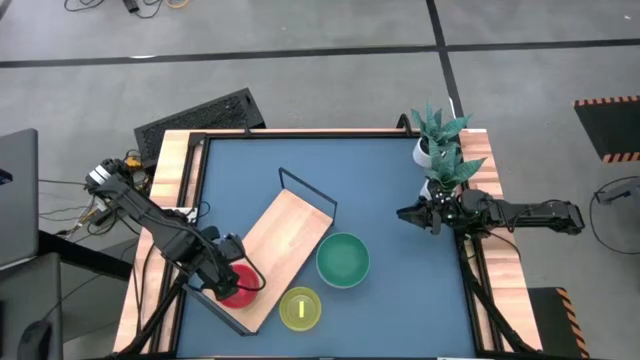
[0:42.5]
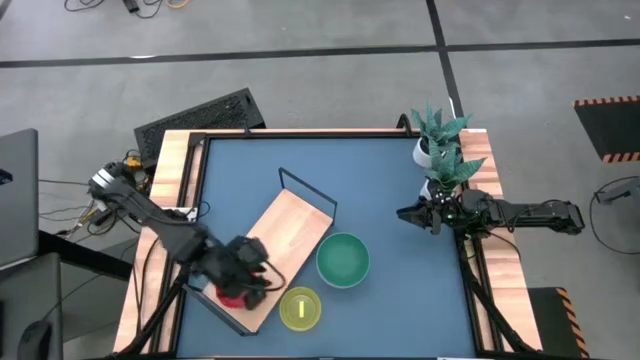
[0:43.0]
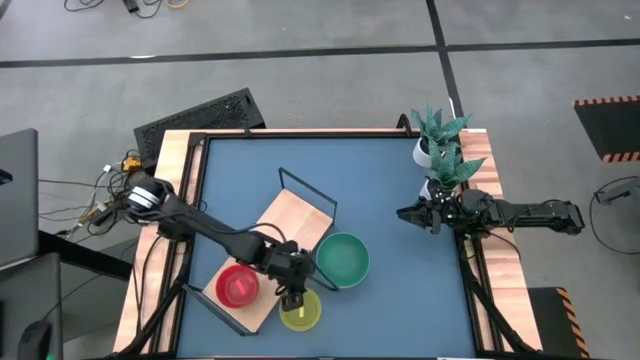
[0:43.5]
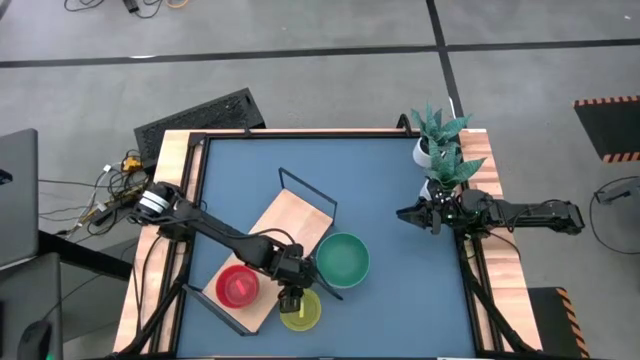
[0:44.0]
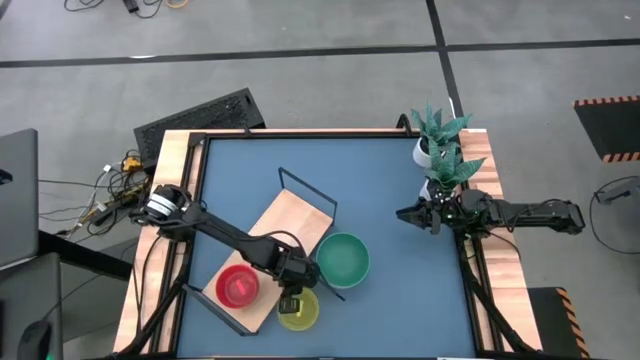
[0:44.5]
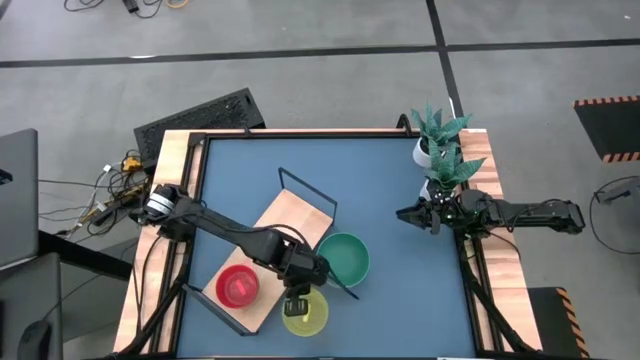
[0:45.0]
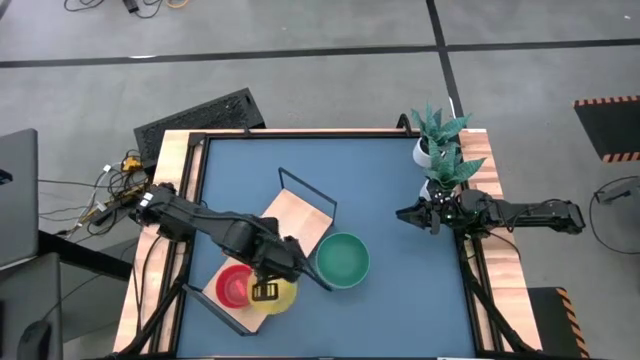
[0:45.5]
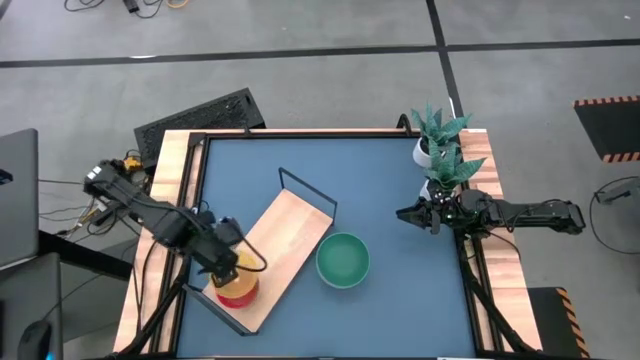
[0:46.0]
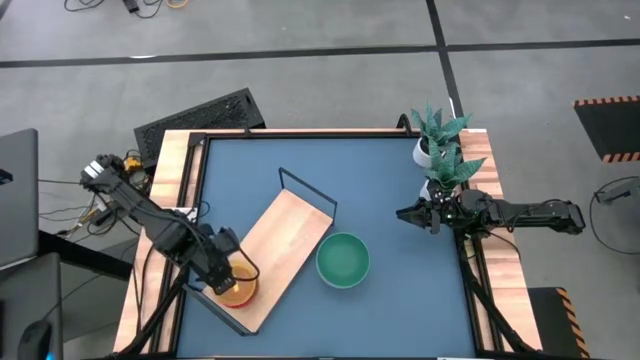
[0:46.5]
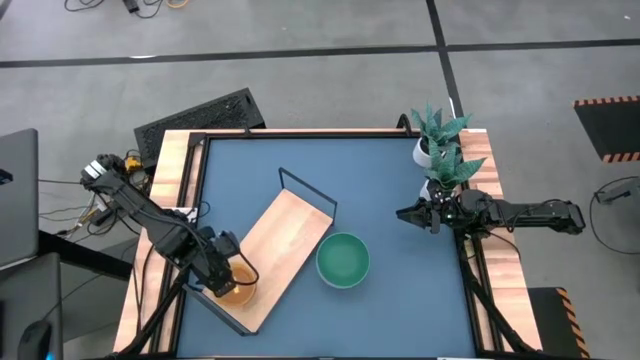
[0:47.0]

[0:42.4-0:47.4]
Task: Place and stack bowls onto a shelf
Stack the yellow bowl on top of the orange bowl on the shelf

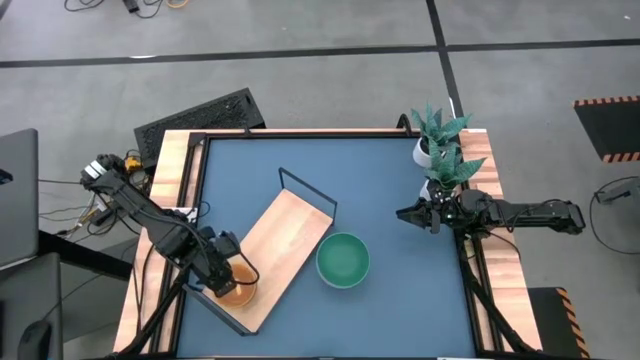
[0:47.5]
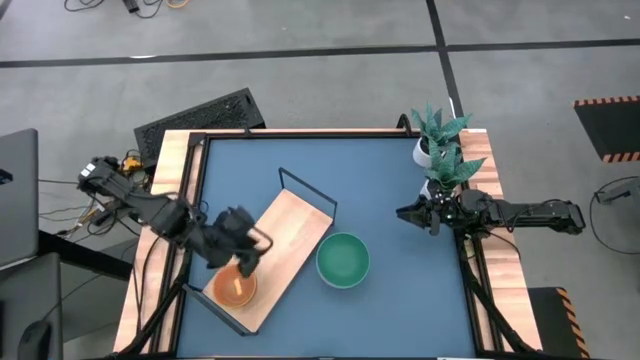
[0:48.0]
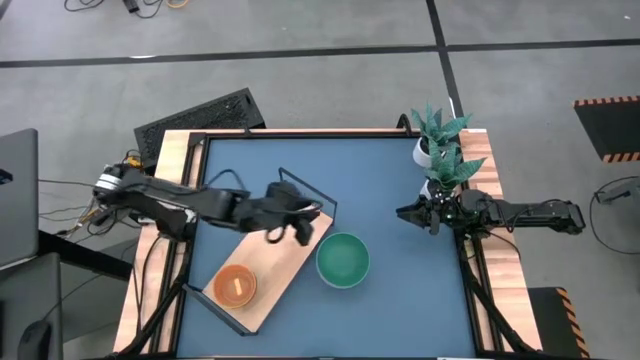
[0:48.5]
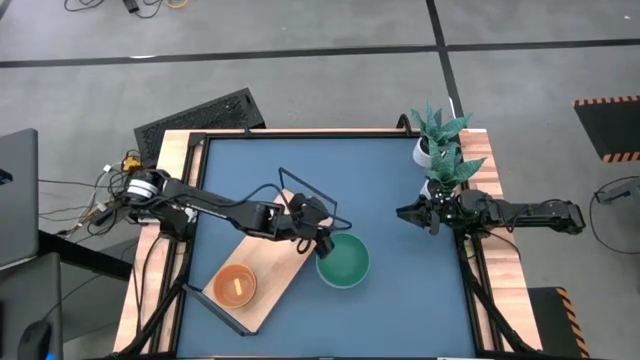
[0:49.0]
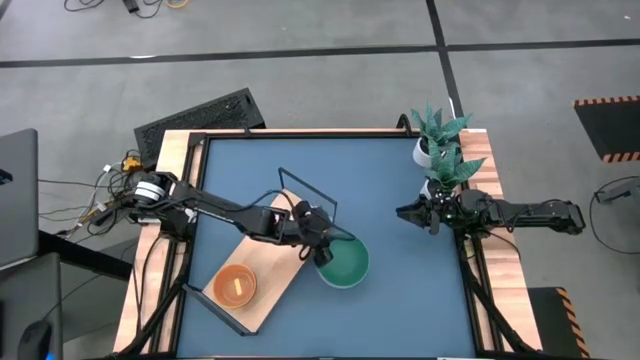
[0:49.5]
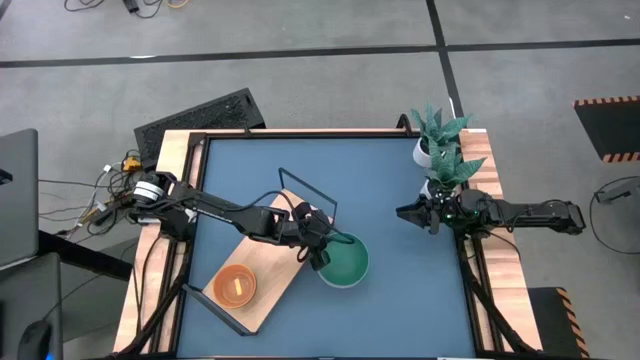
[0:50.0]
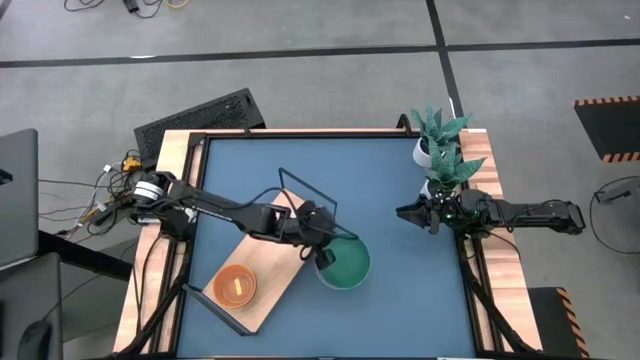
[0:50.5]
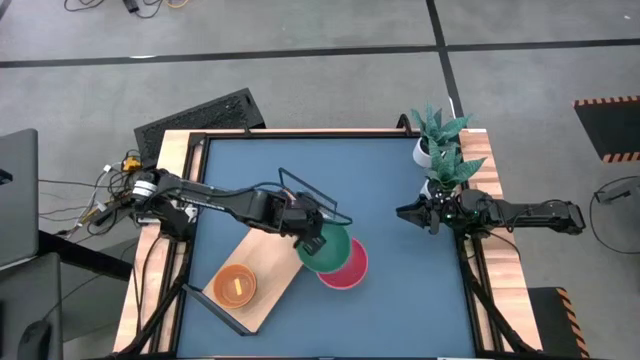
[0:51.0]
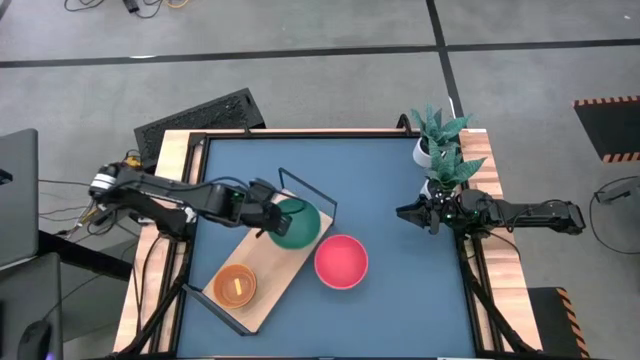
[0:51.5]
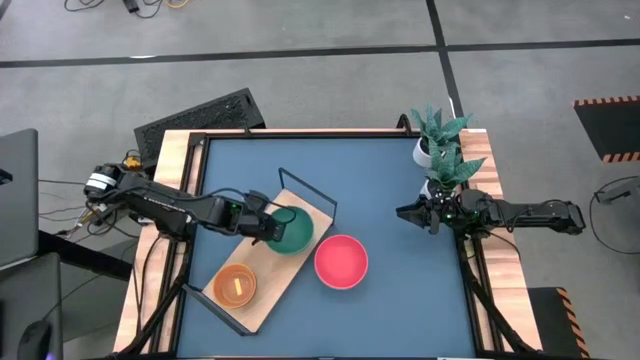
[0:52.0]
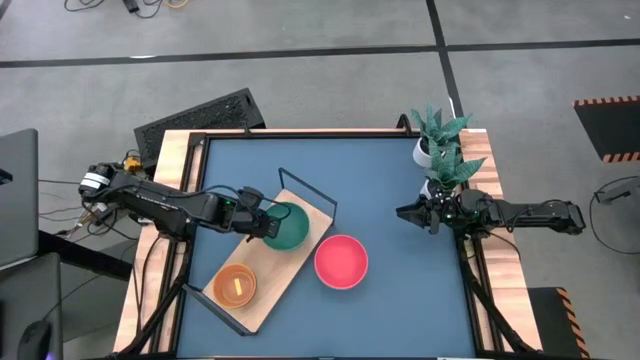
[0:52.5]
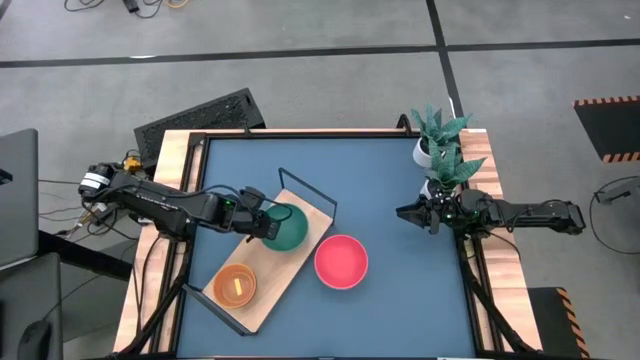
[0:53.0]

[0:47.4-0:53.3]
Put the big dark green bowl on the shelf

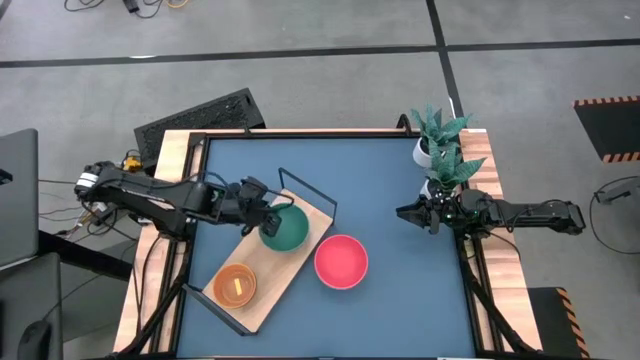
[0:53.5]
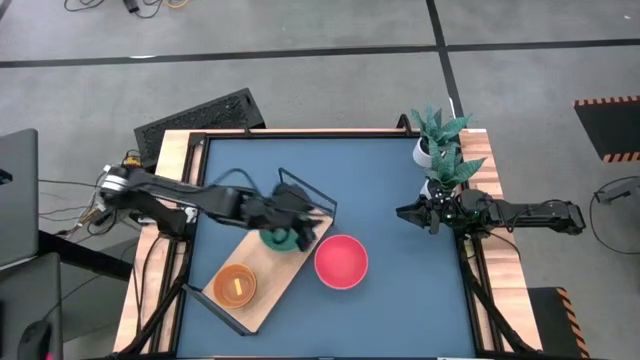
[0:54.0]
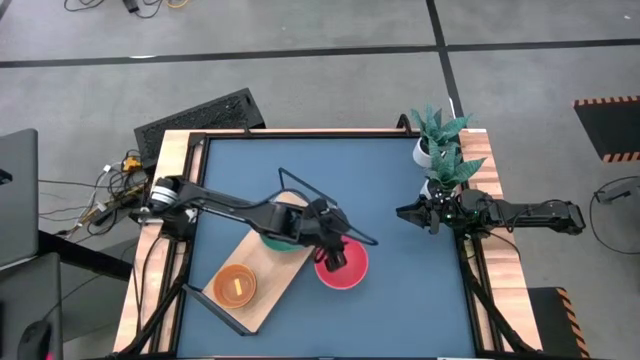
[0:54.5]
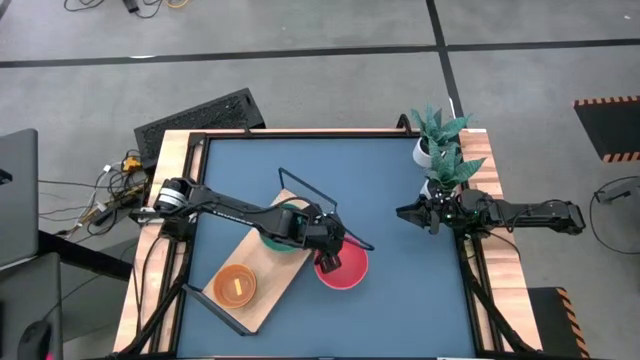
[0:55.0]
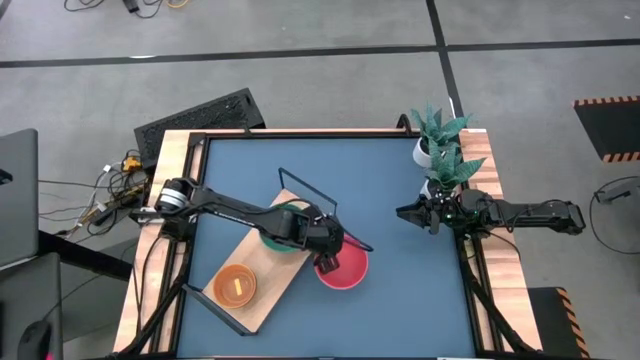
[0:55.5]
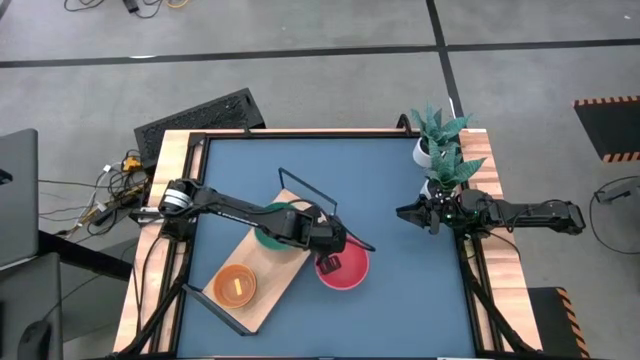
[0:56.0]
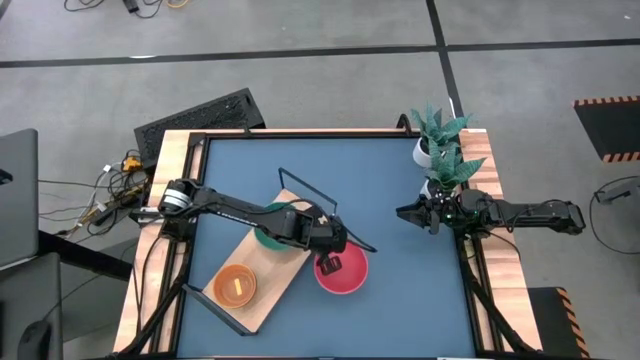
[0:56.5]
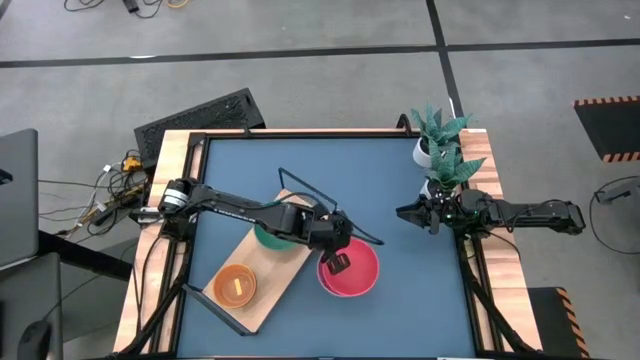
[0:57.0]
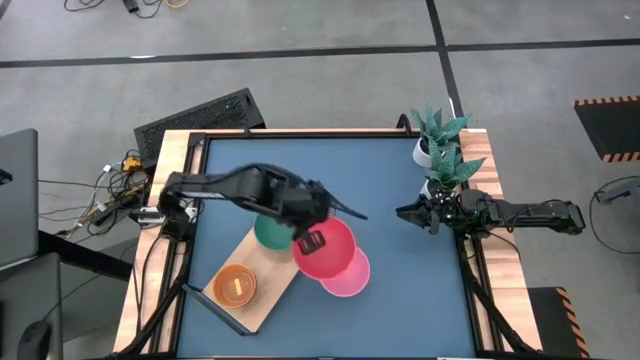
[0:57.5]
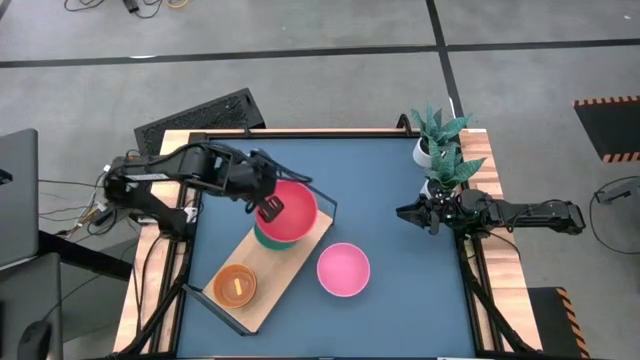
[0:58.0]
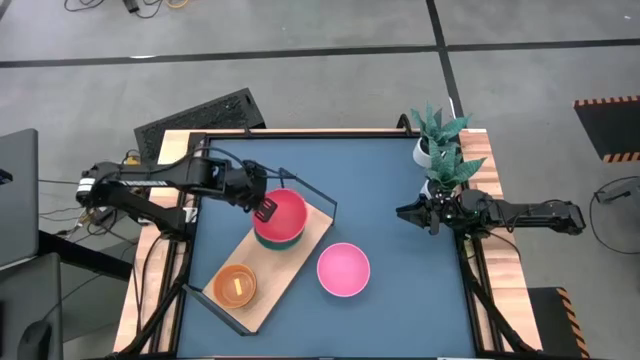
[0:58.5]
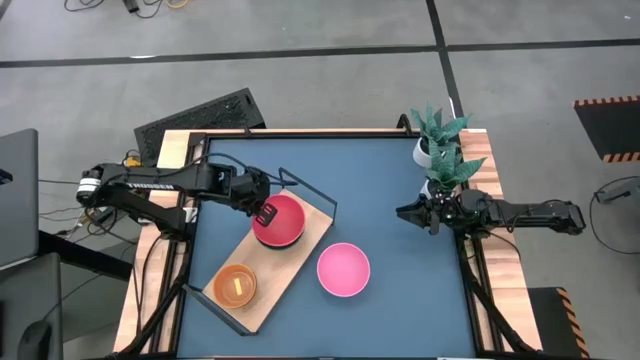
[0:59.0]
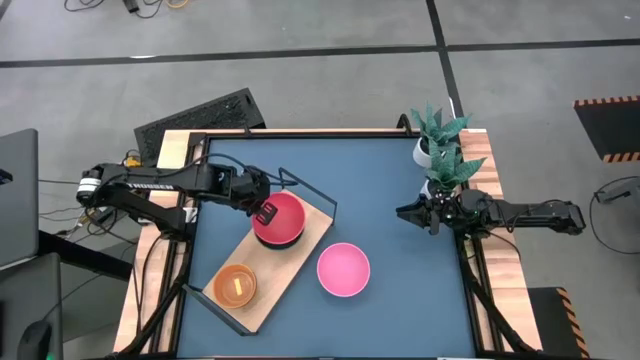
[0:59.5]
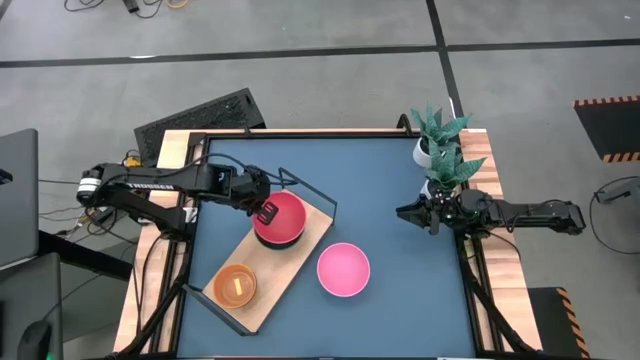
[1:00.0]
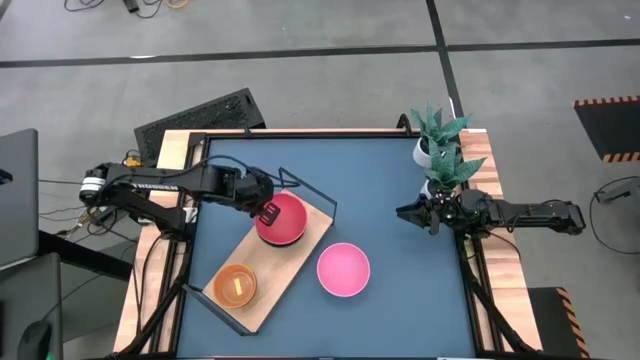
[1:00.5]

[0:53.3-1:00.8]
Stack the big red bowl on top of the big green bowl on the shelf

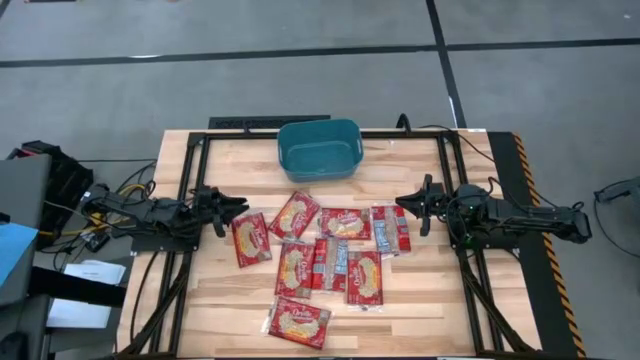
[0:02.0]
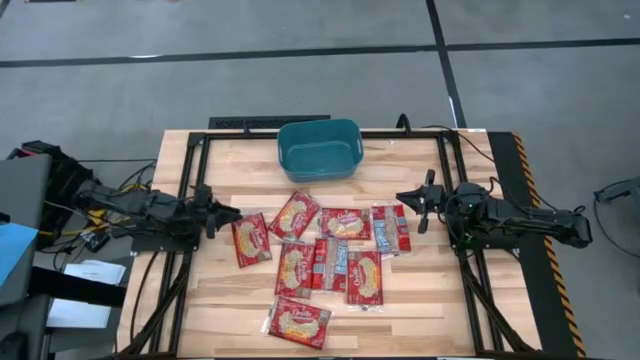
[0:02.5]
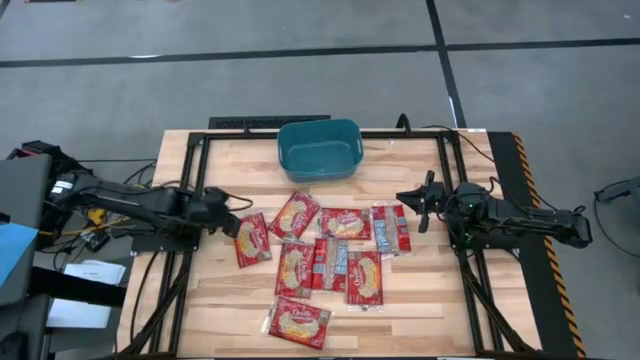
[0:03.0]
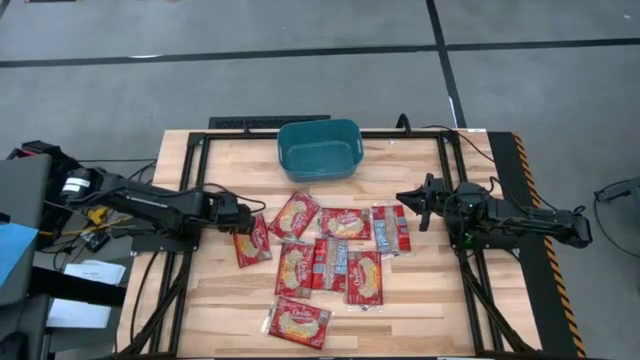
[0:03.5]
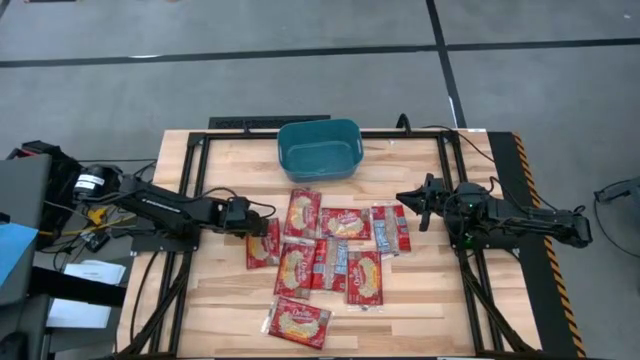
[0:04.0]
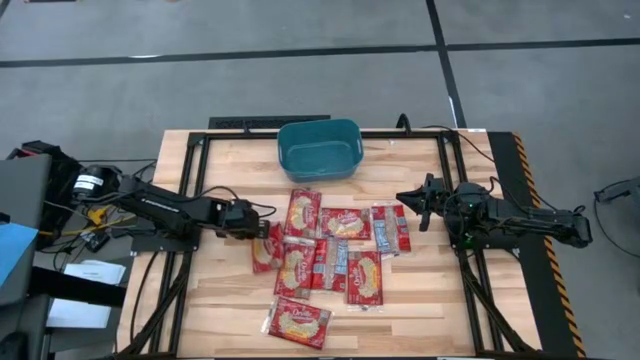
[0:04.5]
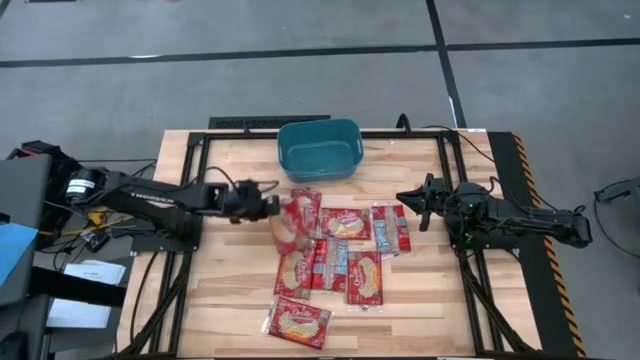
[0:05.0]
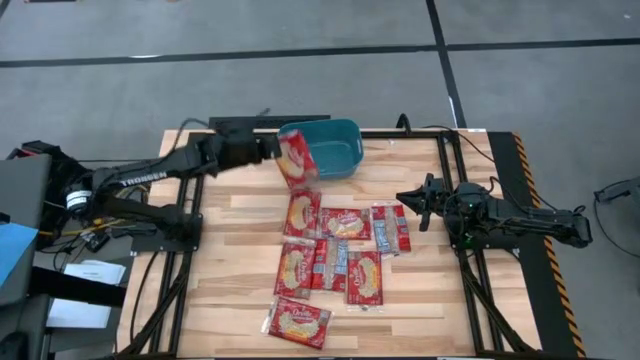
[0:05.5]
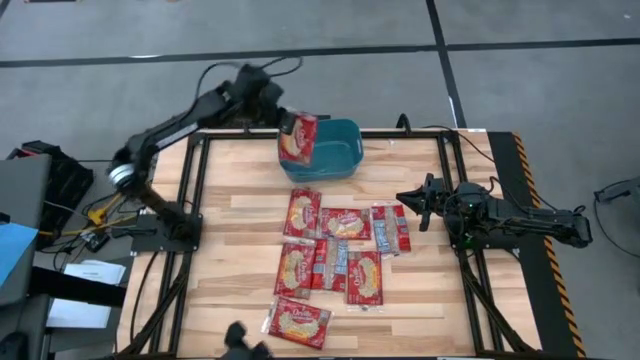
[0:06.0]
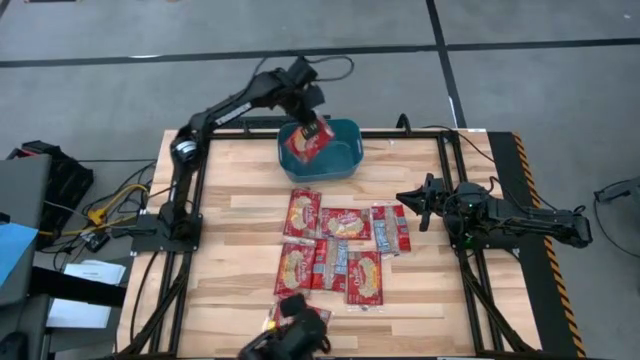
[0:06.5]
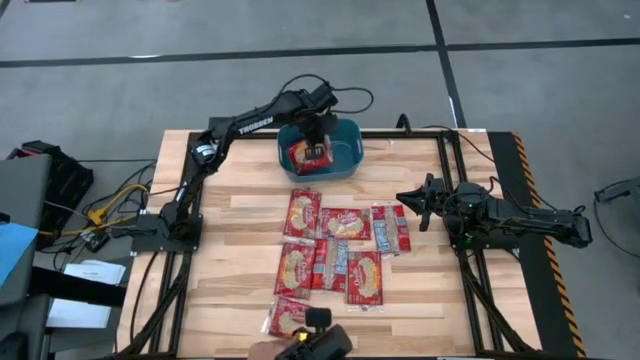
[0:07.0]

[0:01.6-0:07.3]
Task: Sort popcorn bags into baskets
Put the red popcorn bag into the blue bin
